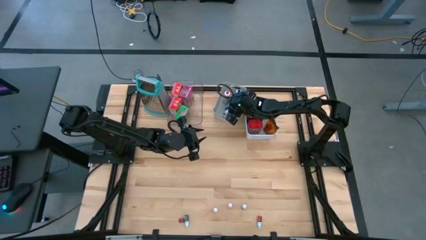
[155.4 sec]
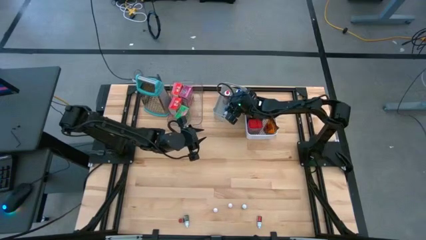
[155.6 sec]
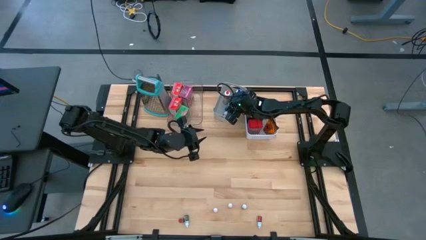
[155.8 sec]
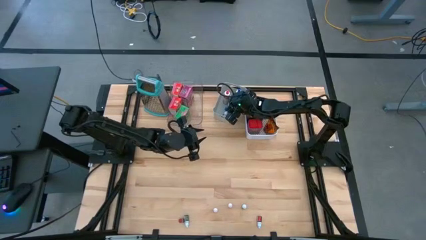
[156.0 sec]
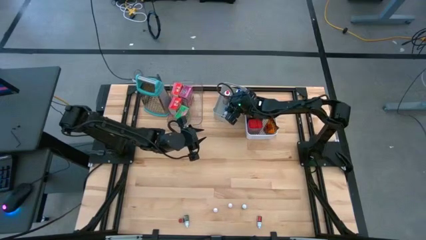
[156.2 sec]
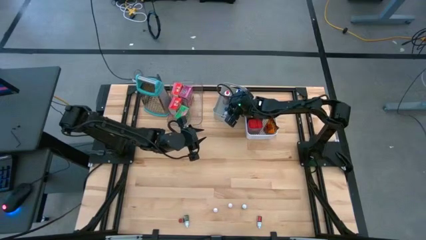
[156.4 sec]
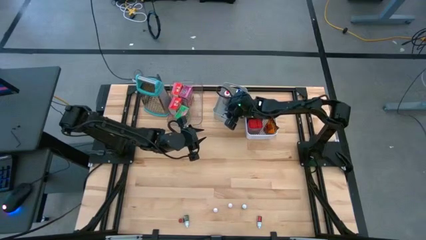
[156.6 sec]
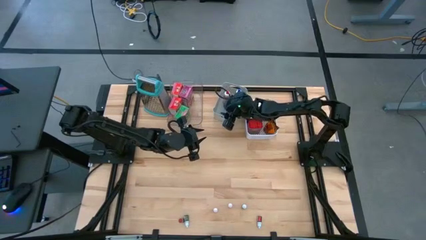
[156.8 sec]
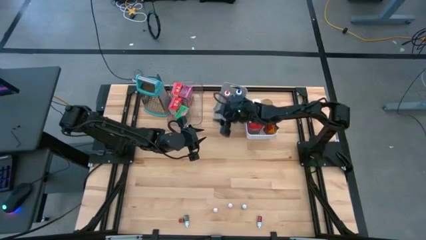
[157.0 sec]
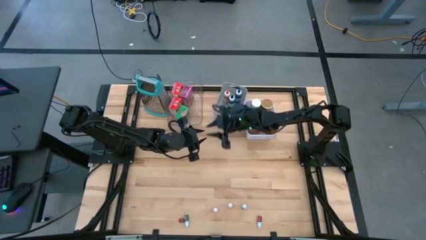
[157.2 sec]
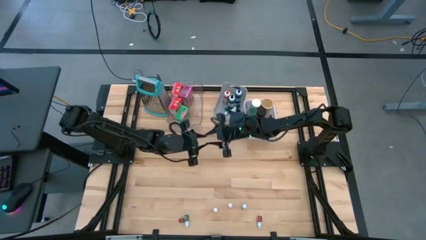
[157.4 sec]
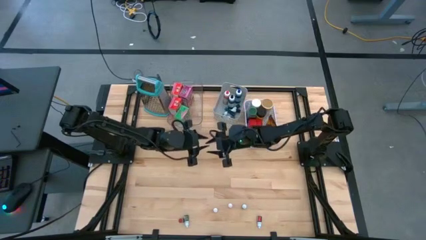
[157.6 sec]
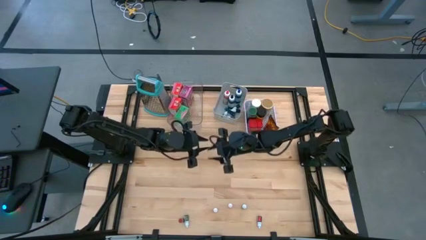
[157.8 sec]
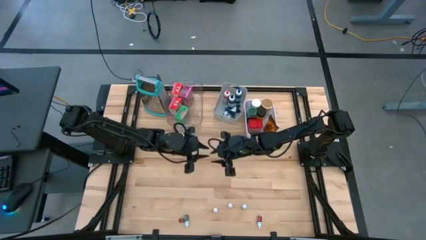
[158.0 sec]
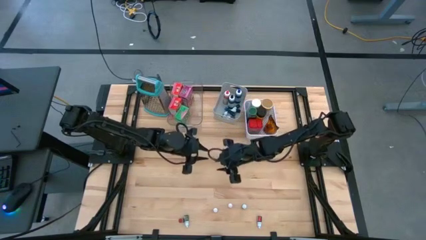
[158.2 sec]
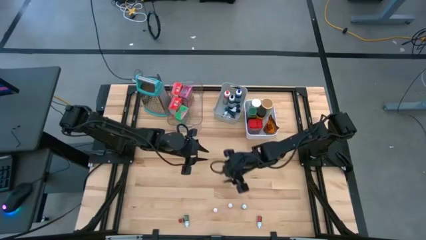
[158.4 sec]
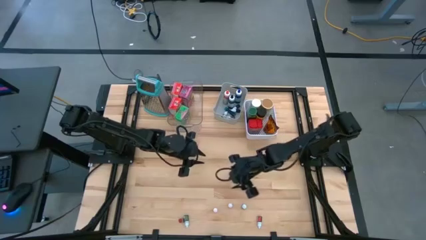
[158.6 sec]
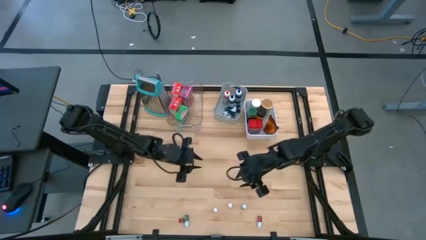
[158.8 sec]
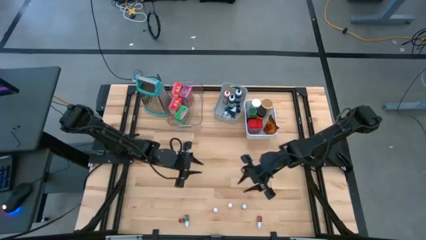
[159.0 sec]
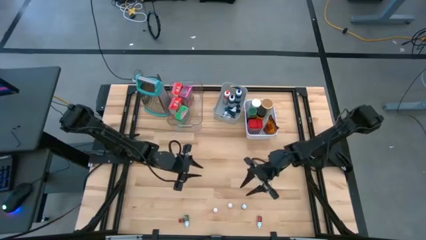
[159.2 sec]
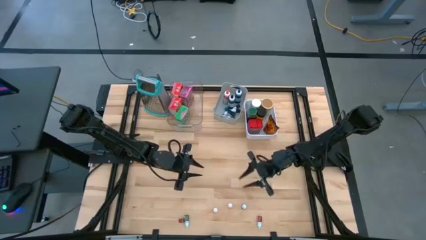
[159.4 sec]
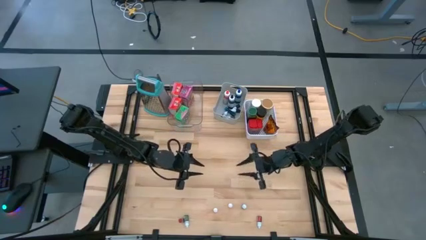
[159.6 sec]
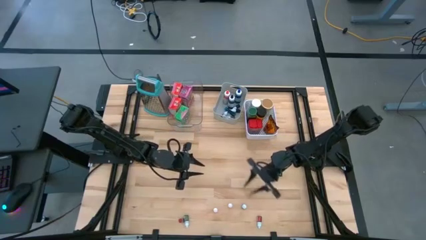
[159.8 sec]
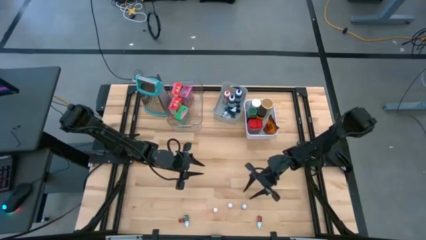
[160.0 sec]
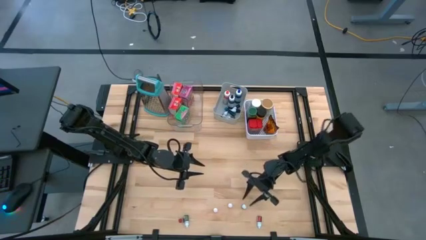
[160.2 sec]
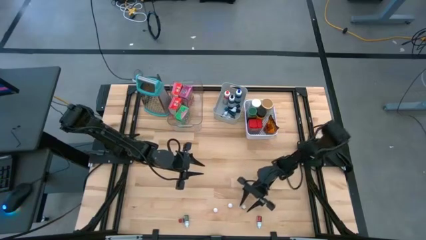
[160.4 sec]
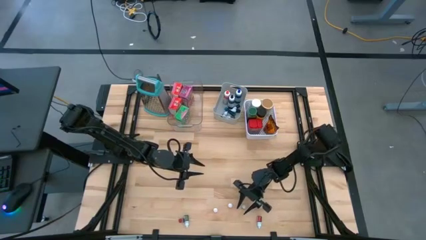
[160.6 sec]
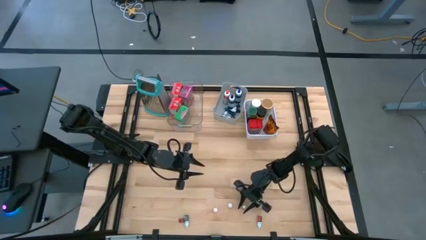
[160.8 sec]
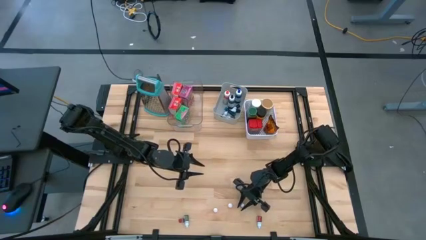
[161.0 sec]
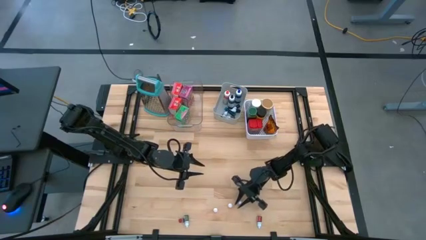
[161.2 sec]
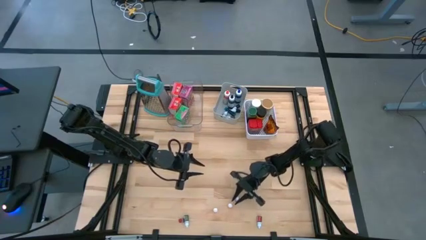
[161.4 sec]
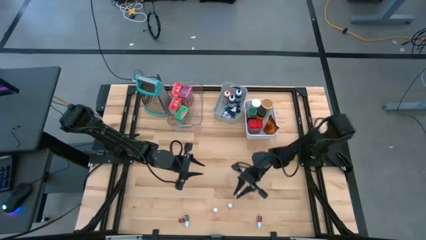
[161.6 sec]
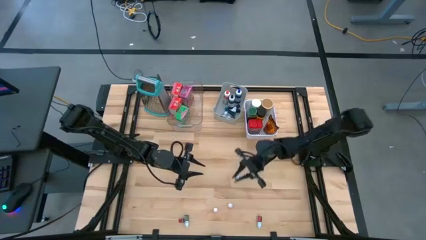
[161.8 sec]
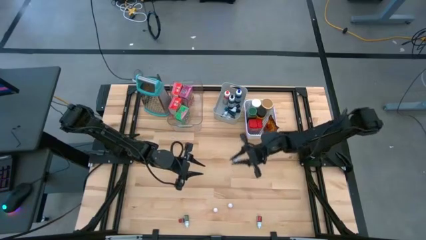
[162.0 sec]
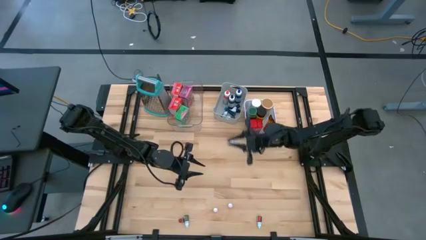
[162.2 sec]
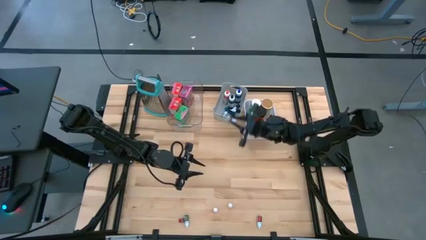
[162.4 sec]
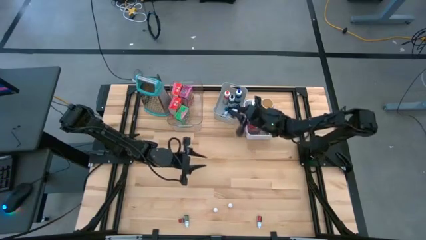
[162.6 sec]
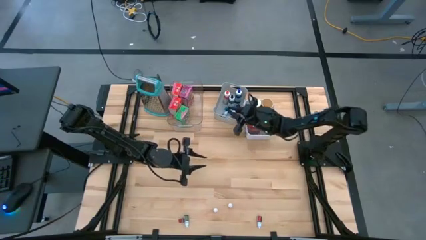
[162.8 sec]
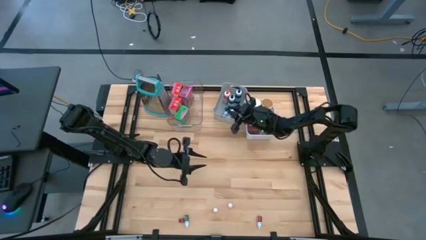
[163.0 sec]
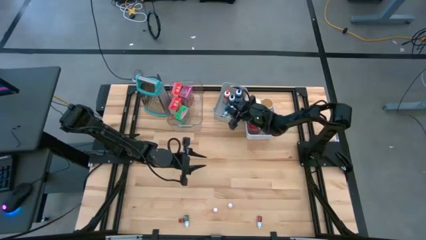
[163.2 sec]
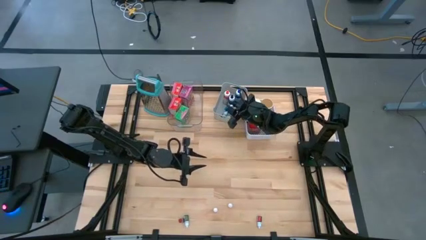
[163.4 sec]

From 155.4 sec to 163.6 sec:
Task: Pick & Place Kitchen Items
Put the top small green food coloring bottle into the gray bin

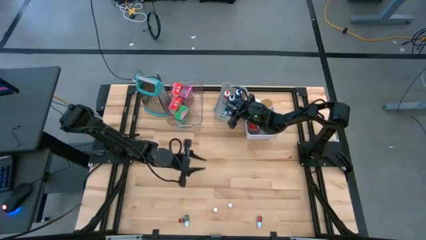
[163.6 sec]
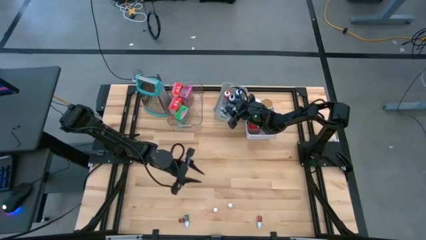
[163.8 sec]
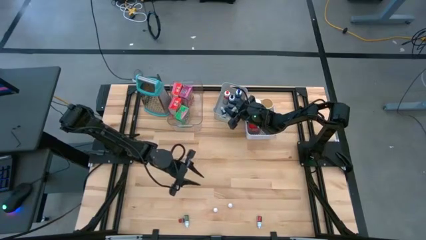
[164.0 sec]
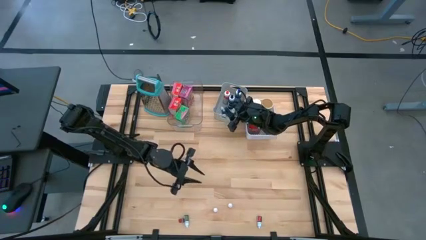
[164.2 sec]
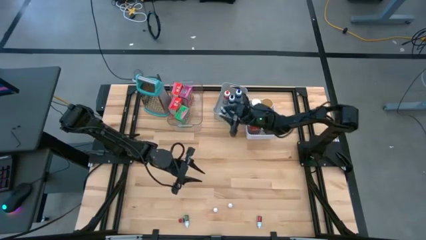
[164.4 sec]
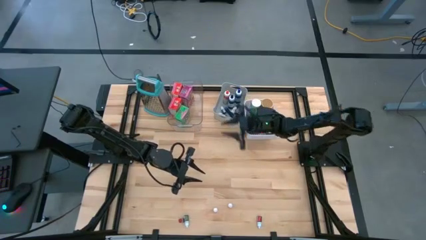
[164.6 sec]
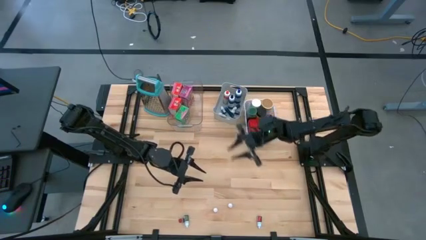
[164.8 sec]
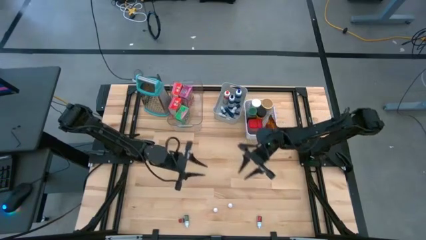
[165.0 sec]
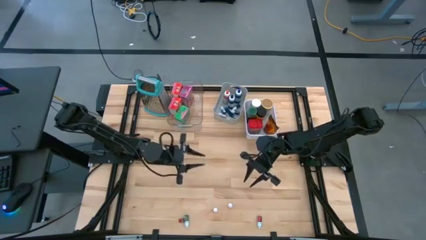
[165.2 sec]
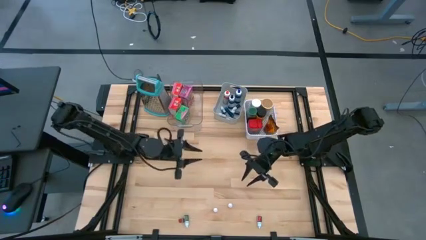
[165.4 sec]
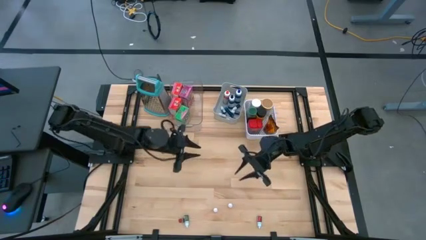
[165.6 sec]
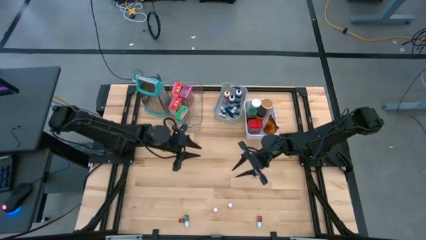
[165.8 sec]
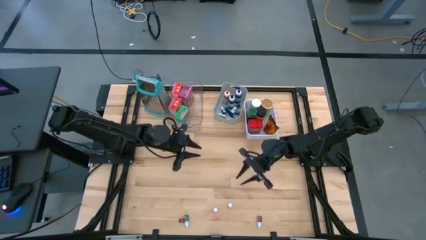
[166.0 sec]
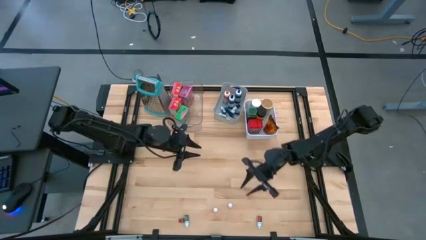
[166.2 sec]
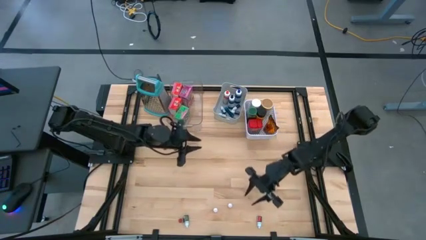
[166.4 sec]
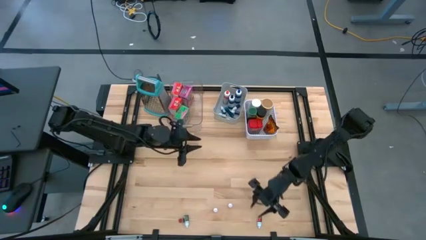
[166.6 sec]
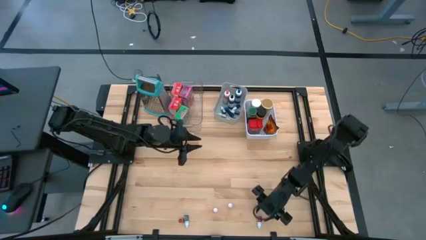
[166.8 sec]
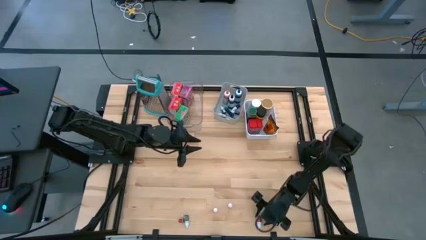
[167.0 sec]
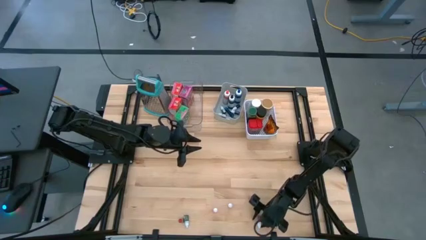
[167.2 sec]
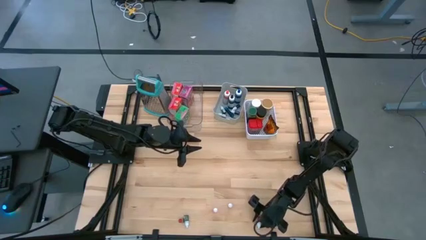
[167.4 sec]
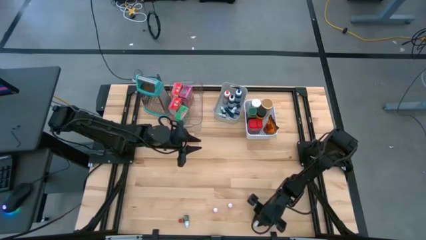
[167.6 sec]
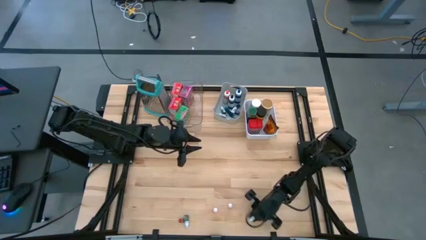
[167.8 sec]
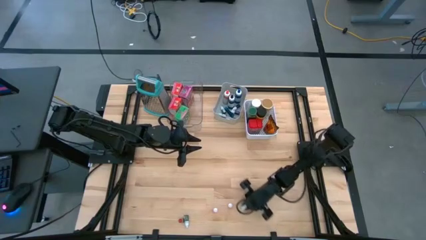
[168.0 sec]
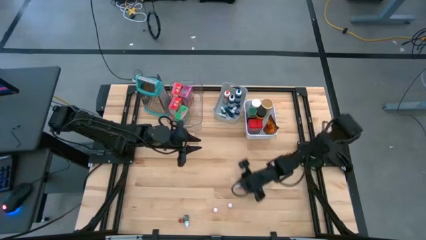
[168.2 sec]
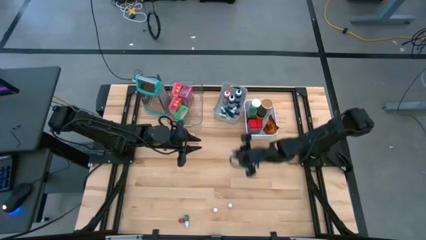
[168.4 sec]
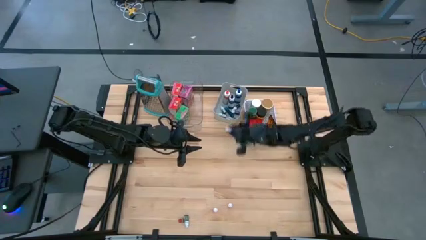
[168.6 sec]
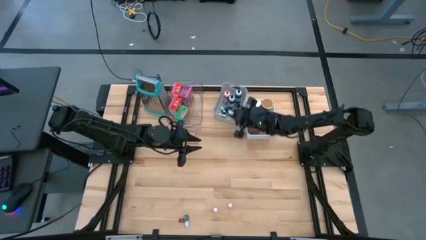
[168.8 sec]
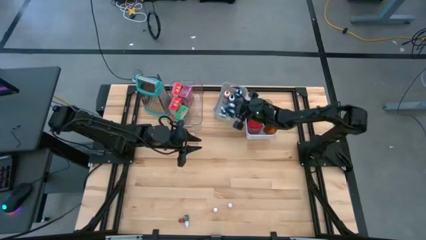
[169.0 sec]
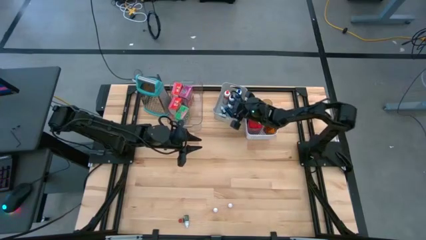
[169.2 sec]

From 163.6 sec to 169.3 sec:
Put the small red food coloring bottle into the gray bin

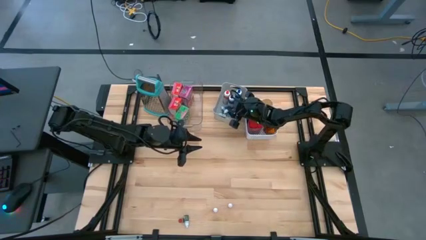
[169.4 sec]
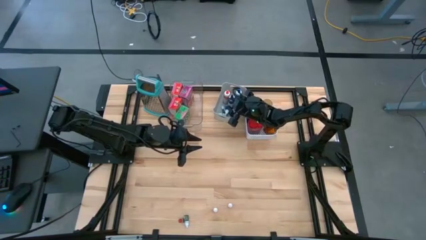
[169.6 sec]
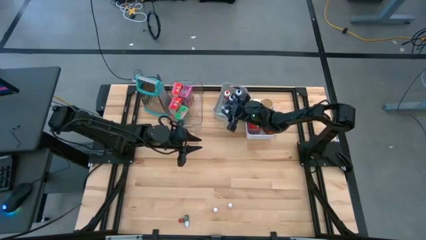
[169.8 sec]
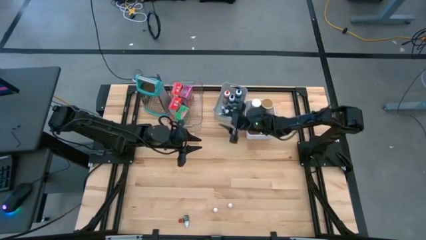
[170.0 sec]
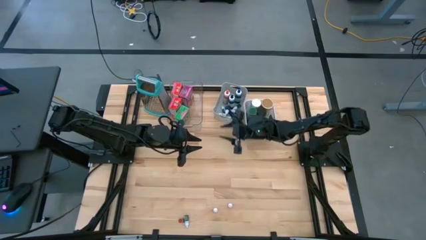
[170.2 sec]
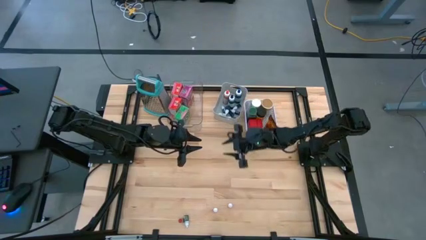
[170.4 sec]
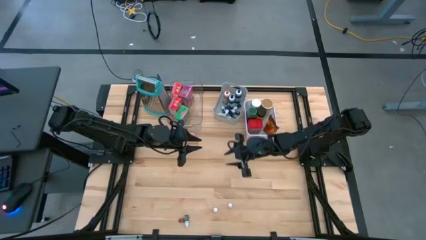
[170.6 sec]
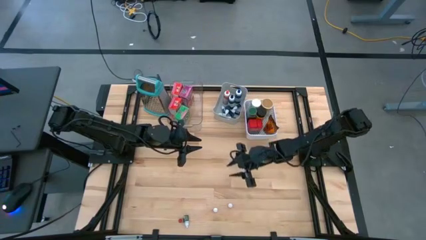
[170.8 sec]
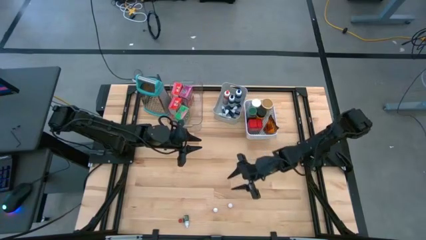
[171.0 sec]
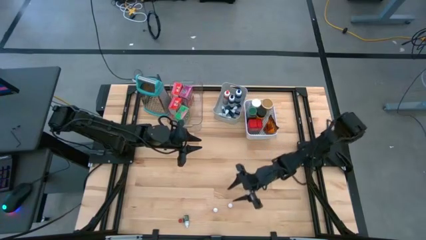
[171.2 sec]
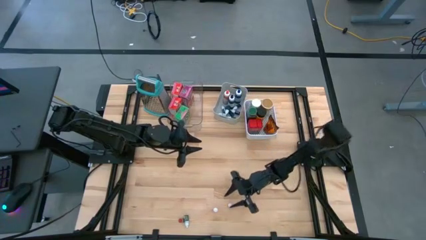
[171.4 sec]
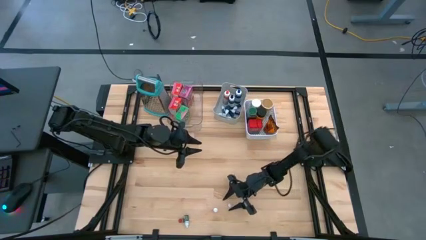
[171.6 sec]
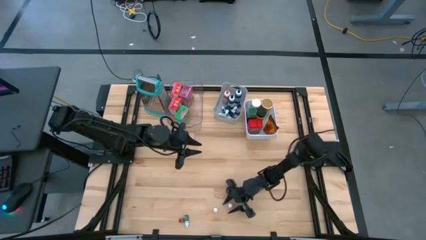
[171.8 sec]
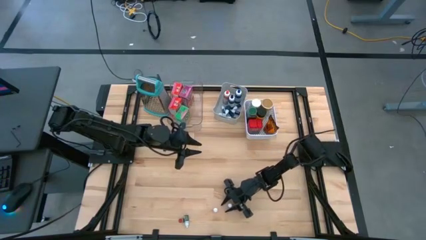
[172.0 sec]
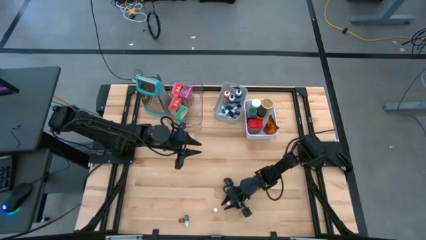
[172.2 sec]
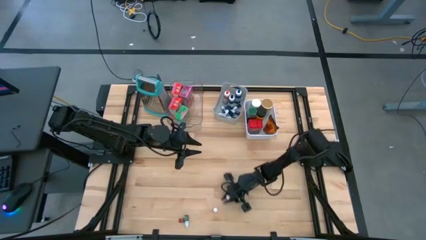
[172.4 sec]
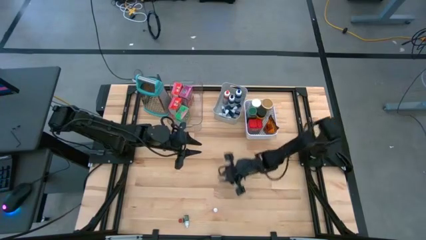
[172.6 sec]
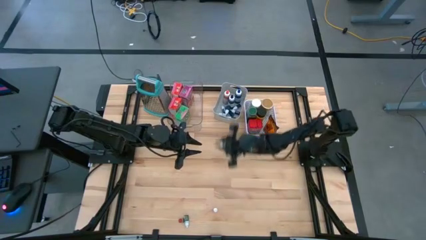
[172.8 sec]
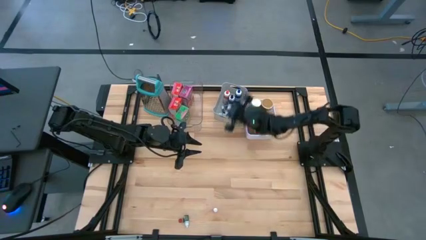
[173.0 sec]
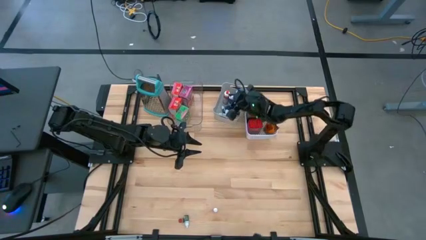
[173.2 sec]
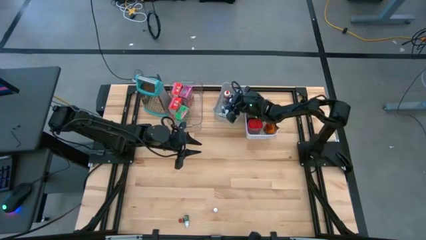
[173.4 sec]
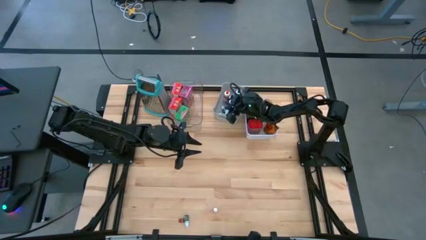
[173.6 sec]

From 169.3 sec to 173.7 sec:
Put the top small orange food coloring bottle into the gray bin
